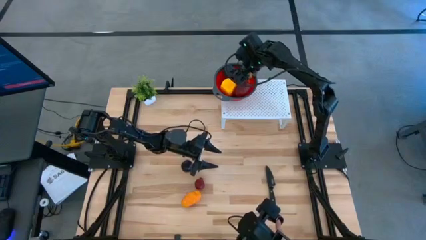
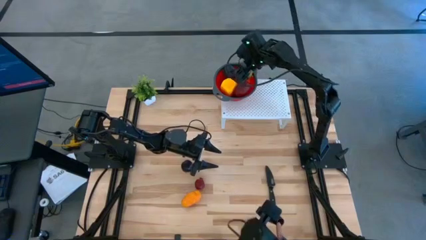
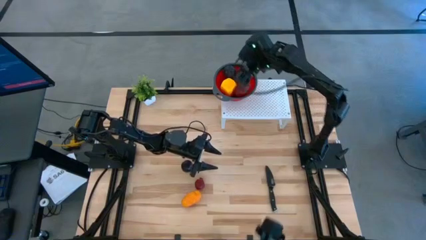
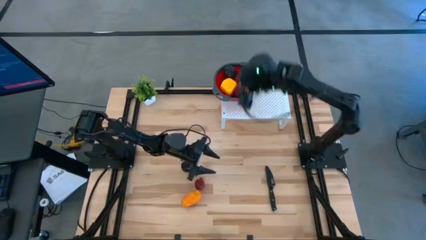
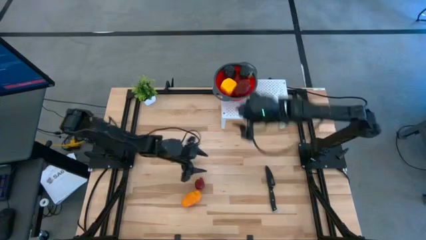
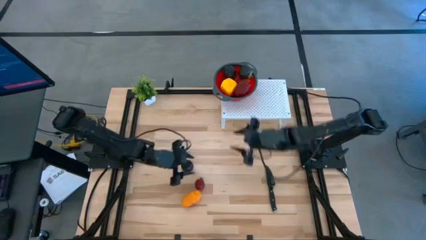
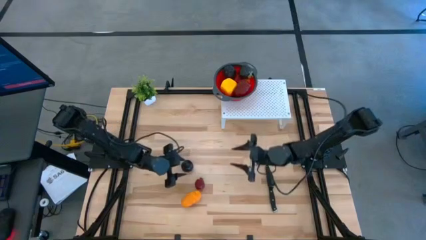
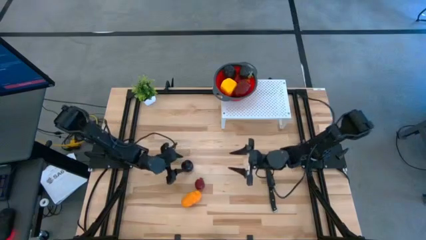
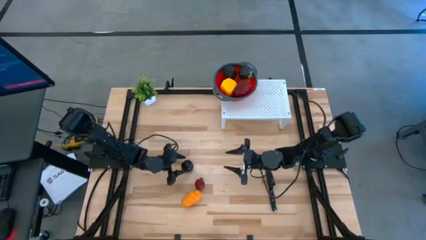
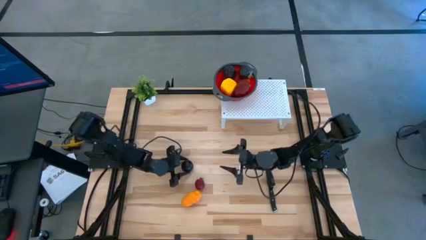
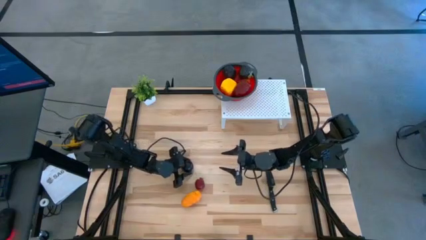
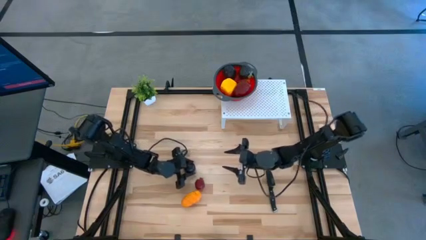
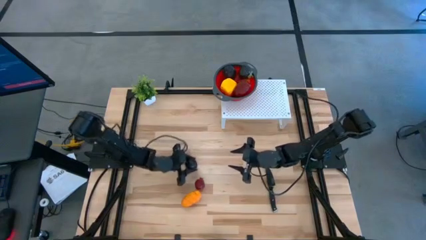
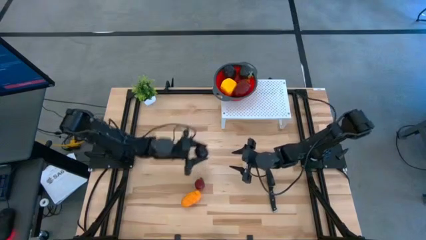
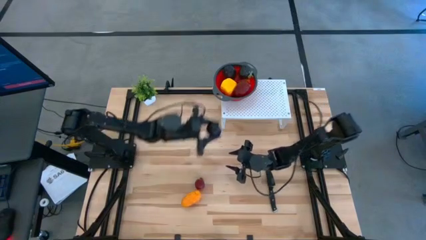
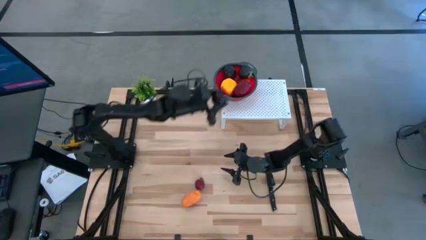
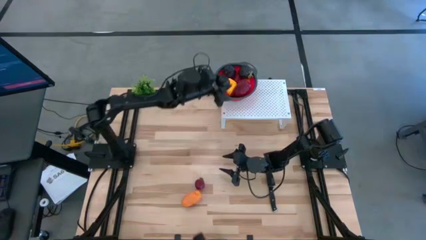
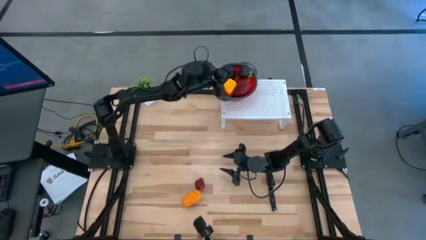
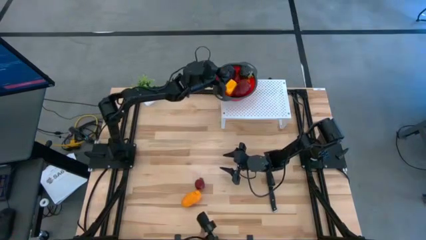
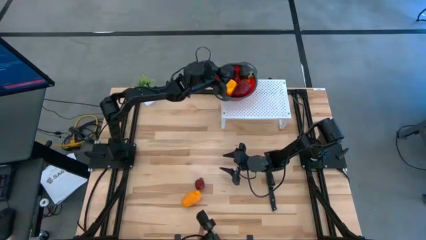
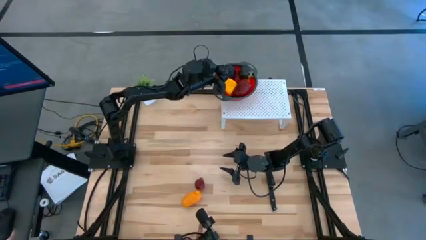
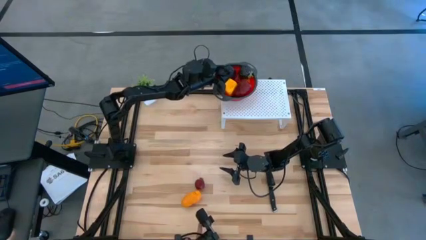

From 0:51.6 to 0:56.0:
Task: Pick & Place Fruit
Put the plum into the red strainer bowl

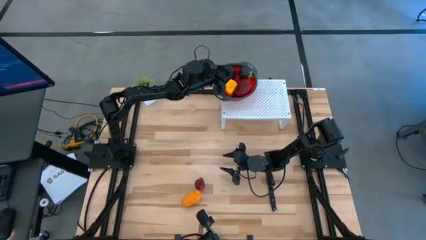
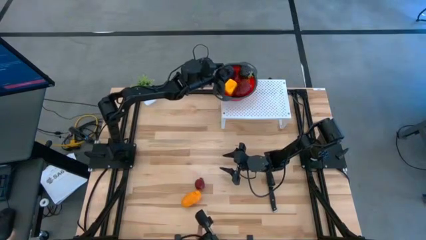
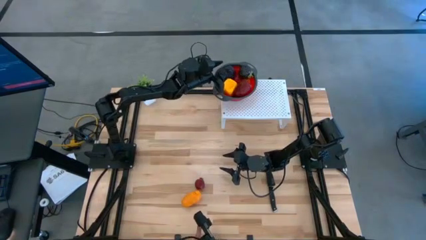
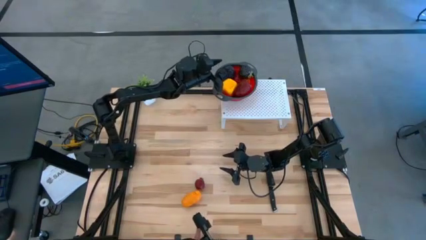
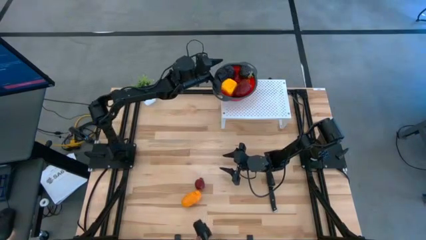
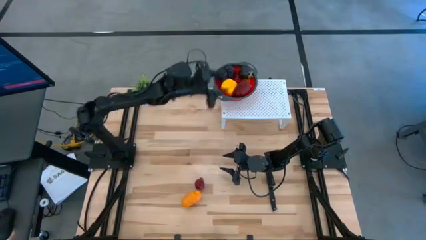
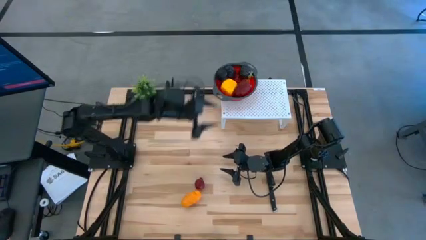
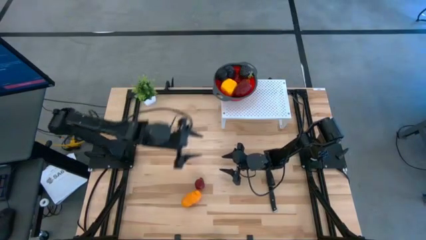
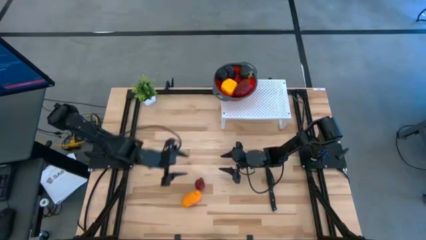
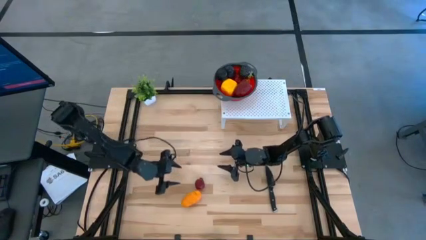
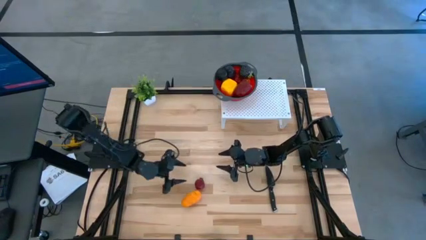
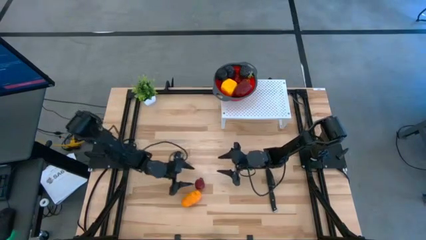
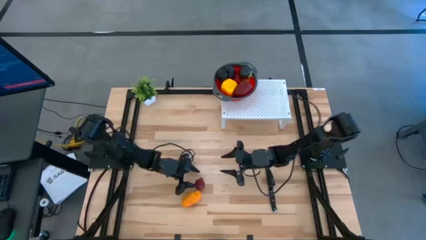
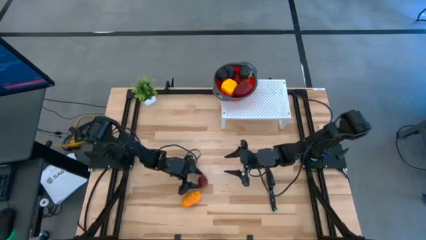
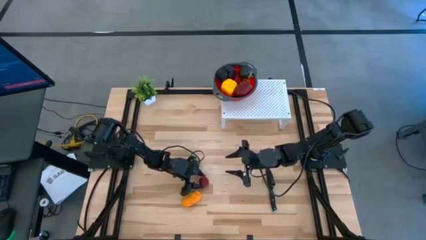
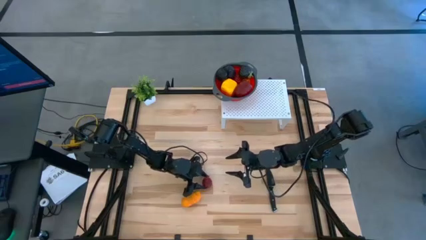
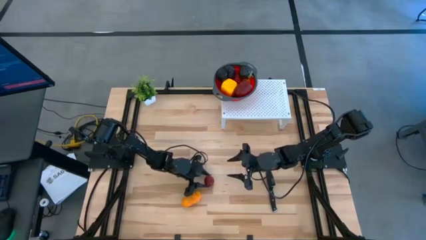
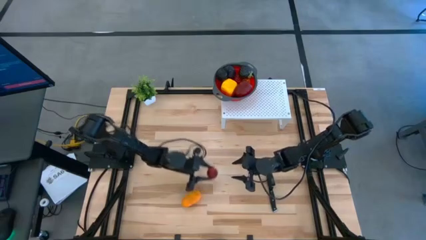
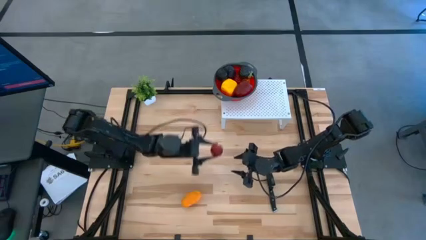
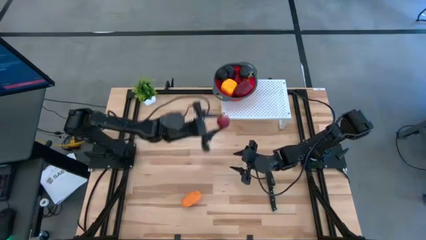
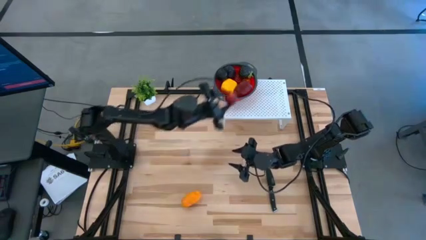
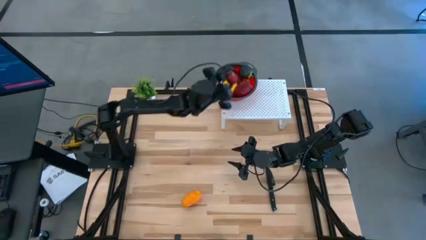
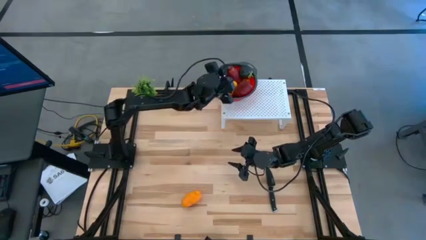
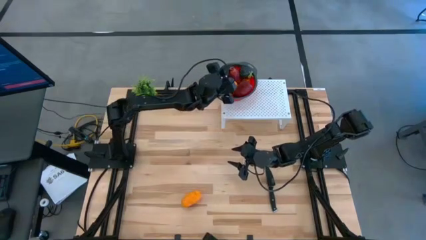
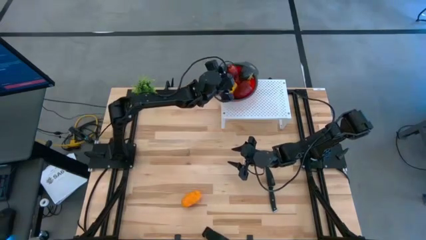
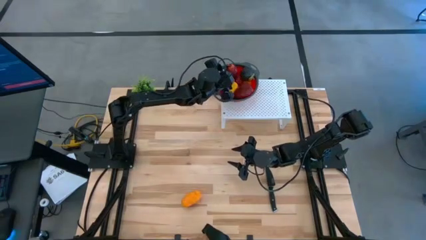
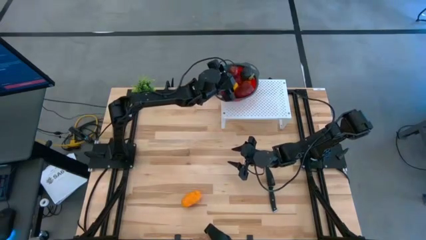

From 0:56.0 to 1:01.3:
Put the pomegranate into the red strainer bowl

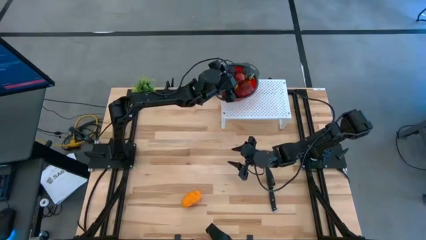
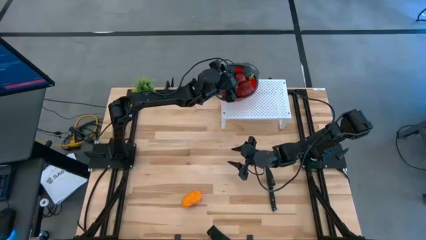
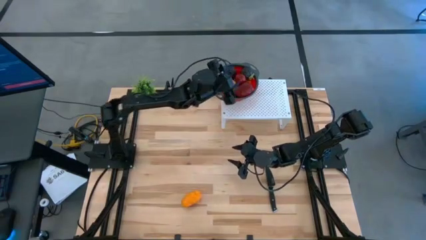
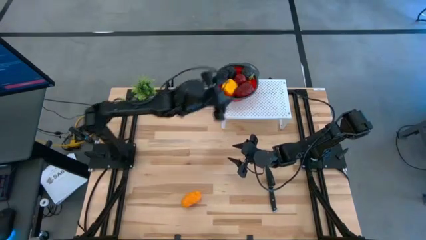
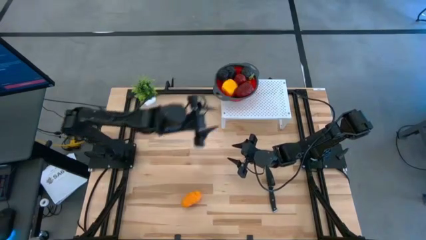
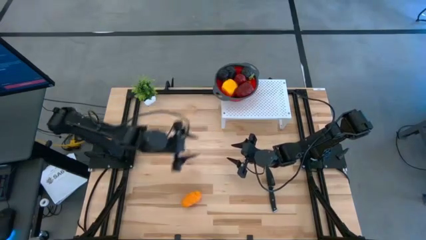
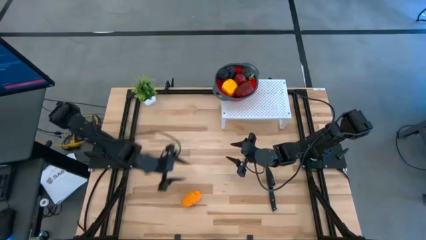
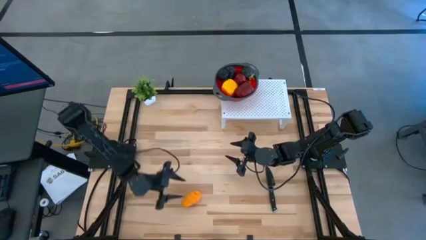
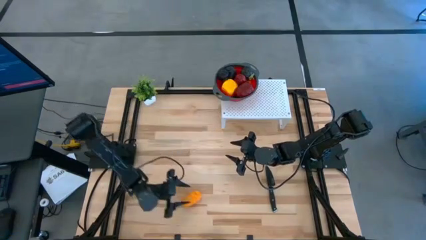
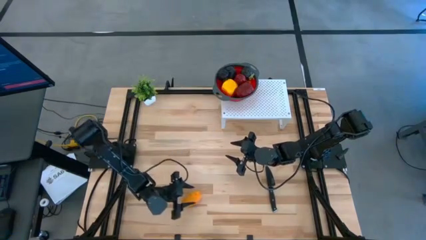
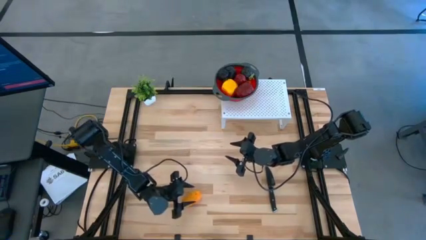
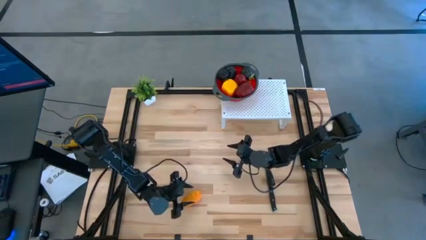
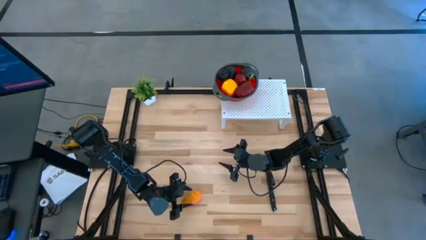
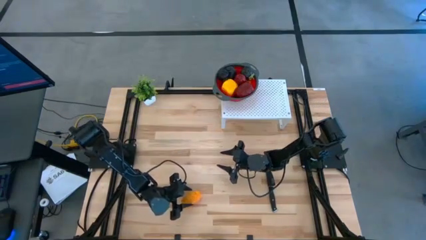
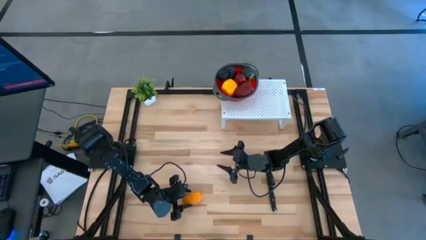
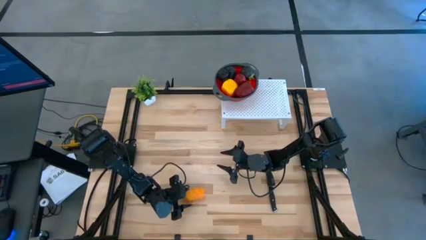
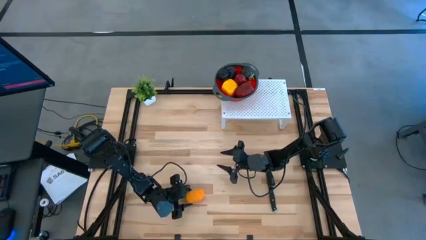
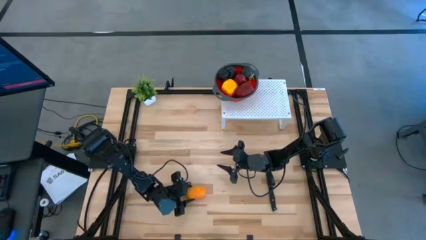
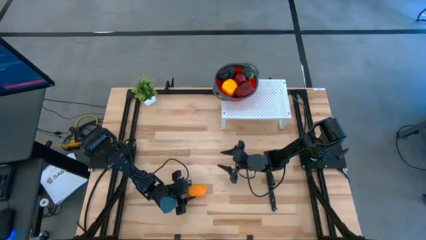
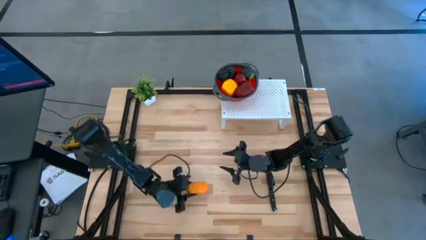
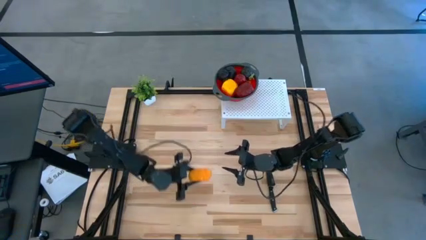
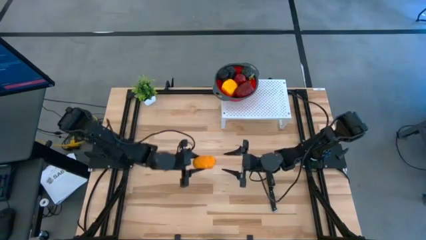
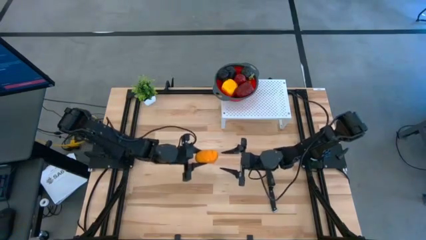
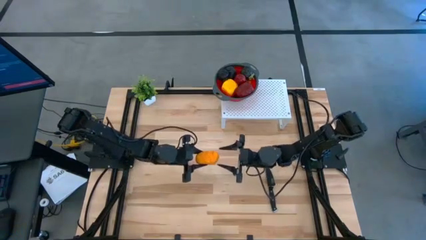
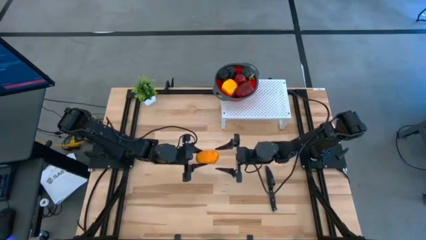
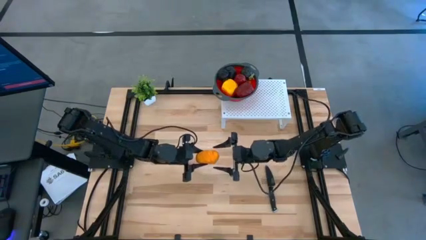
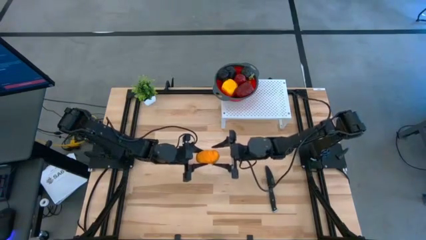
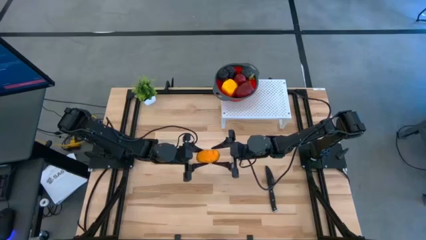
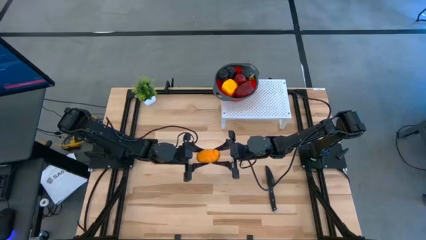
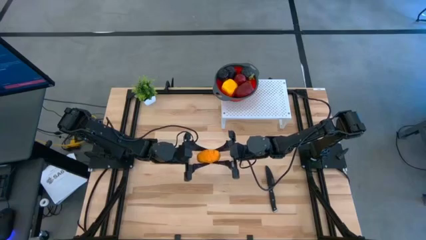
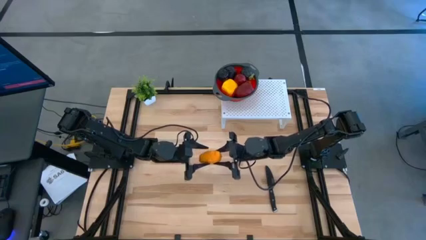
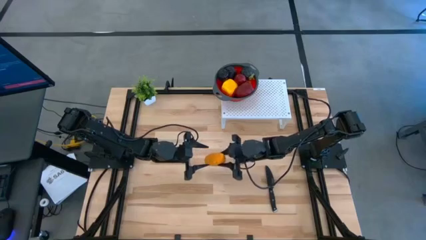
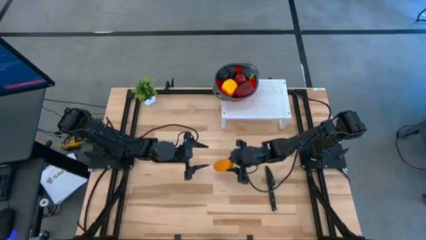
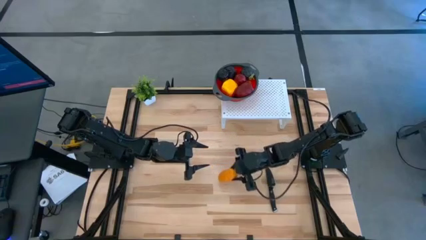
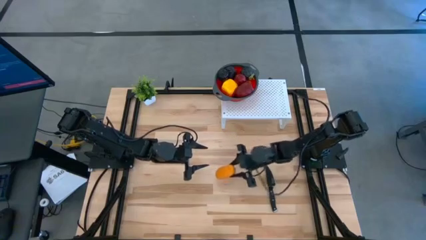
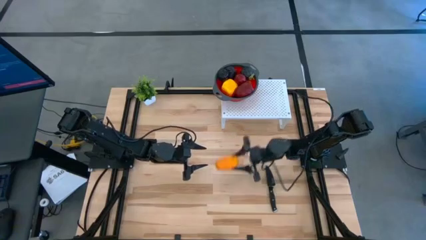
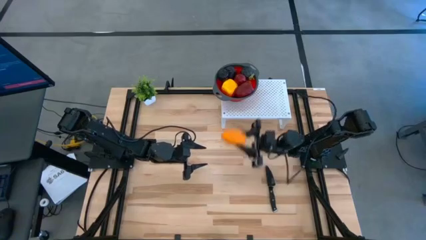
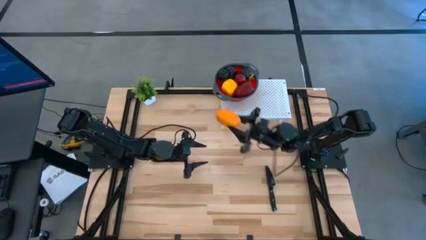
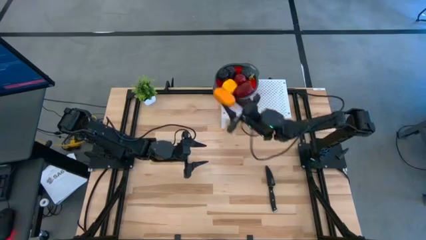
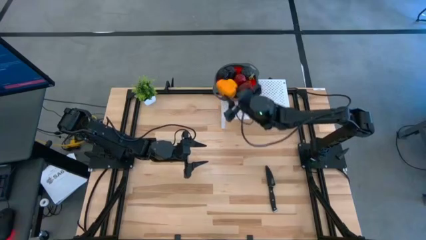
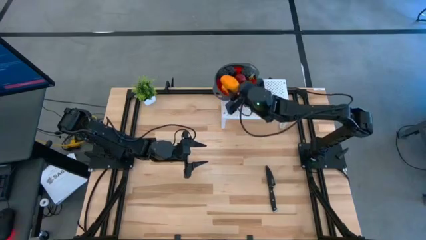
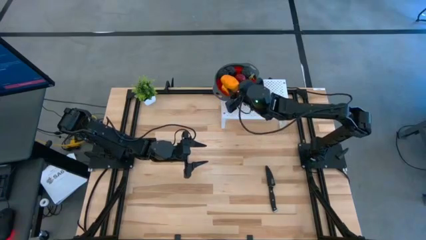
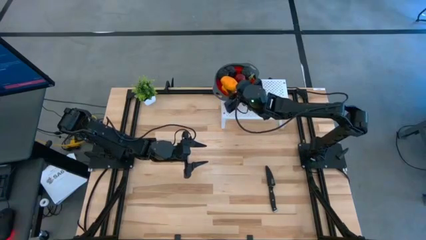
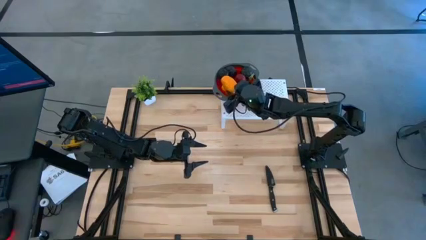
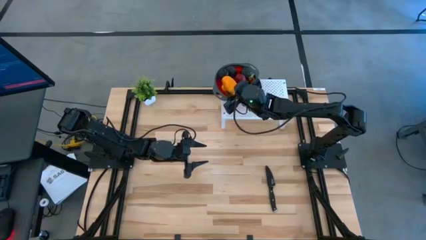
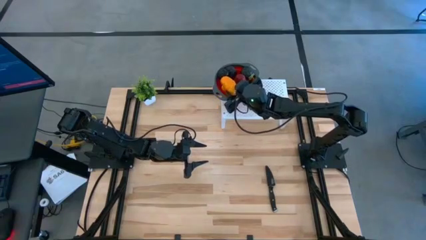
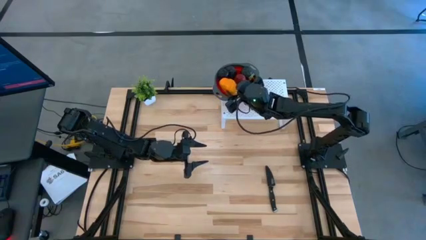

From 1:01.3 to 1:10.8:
Put the mango into the red strainer bowl
